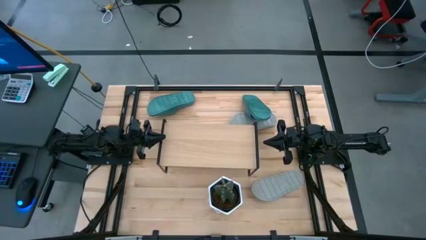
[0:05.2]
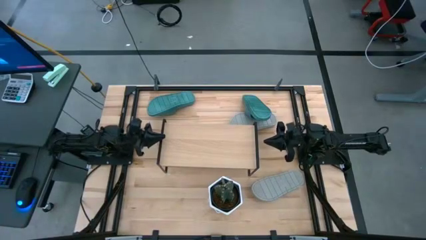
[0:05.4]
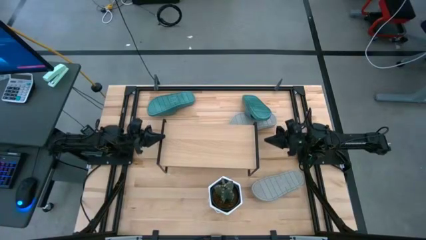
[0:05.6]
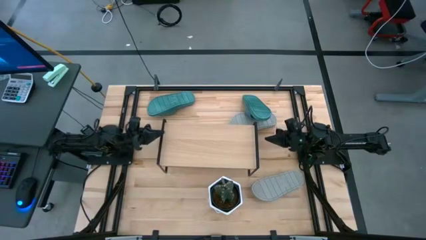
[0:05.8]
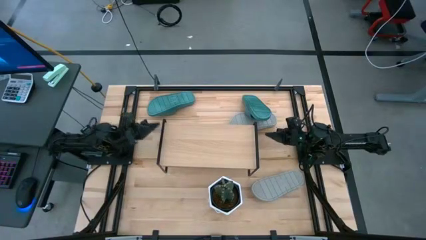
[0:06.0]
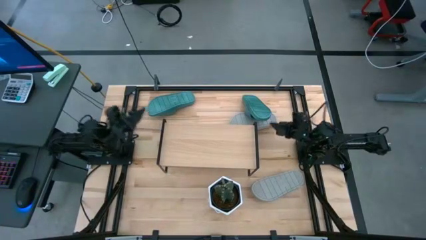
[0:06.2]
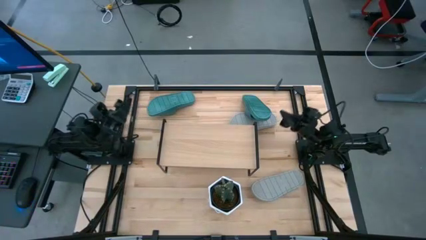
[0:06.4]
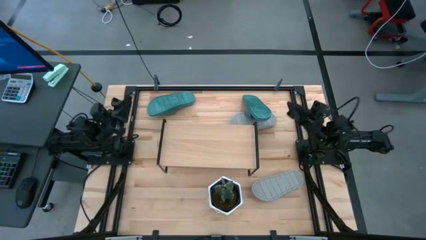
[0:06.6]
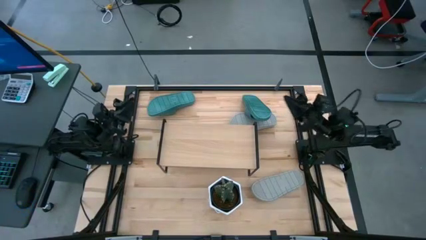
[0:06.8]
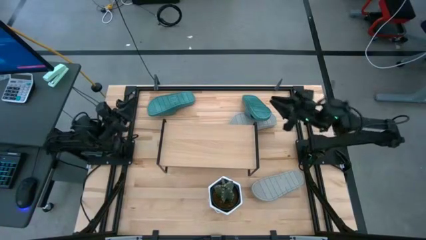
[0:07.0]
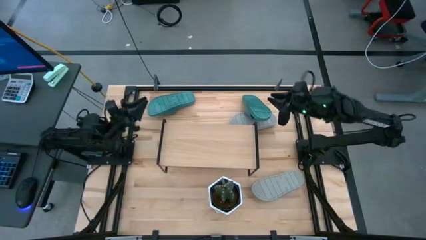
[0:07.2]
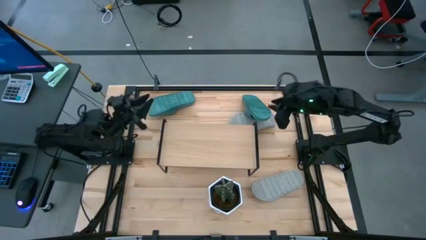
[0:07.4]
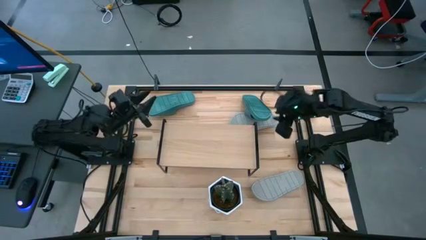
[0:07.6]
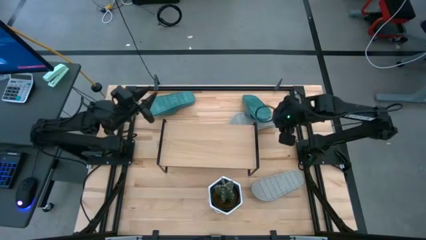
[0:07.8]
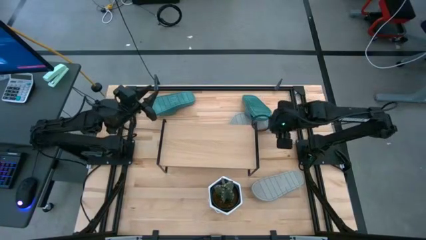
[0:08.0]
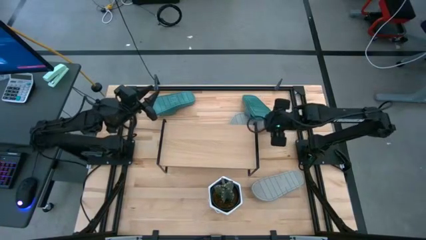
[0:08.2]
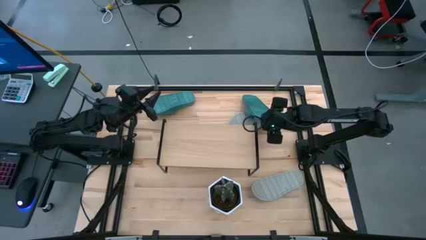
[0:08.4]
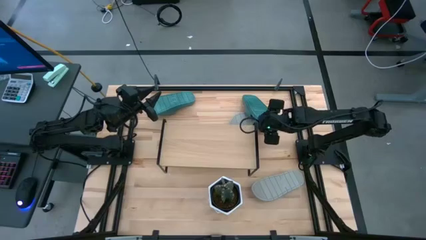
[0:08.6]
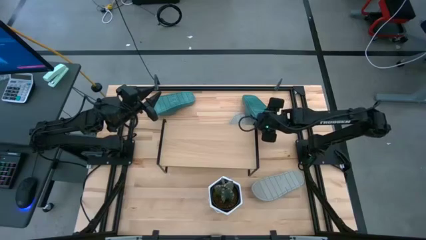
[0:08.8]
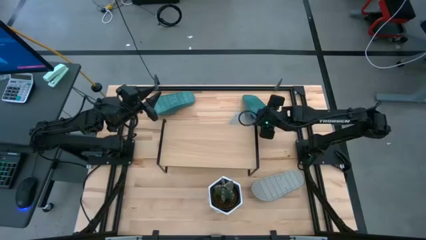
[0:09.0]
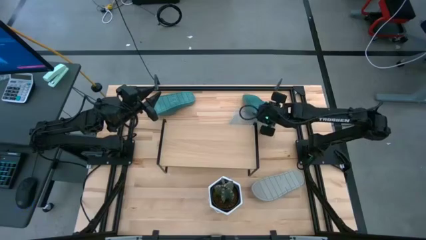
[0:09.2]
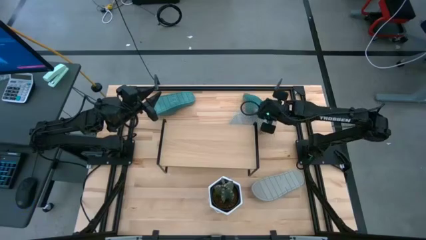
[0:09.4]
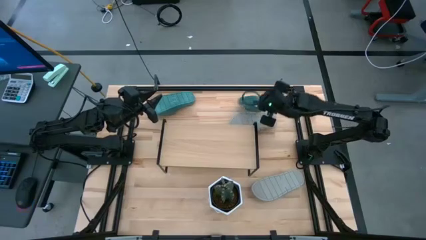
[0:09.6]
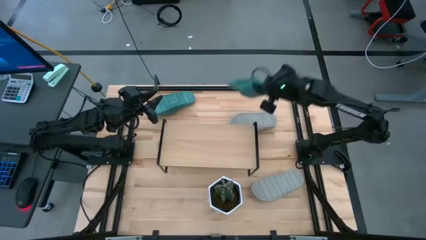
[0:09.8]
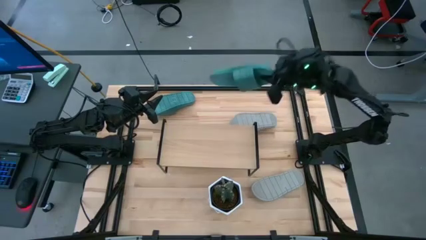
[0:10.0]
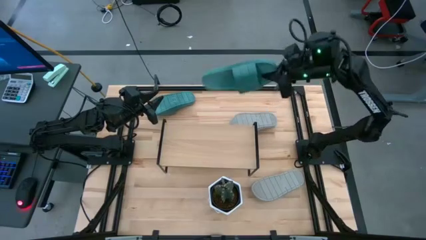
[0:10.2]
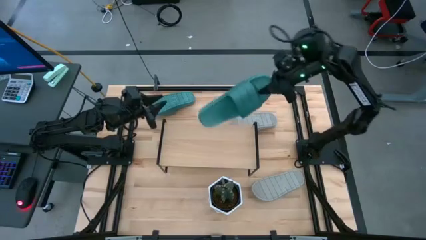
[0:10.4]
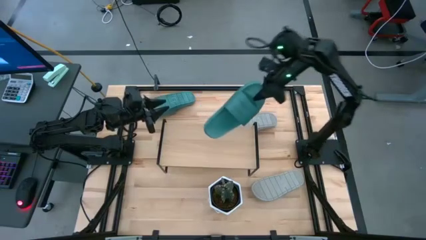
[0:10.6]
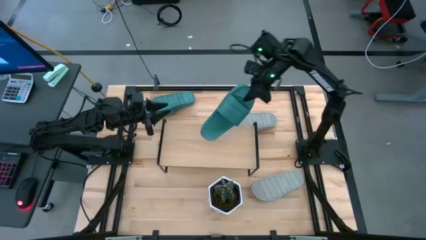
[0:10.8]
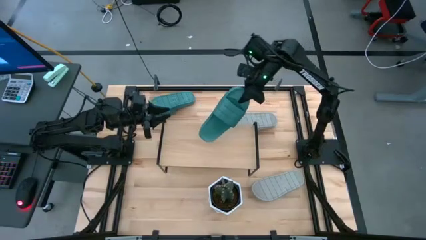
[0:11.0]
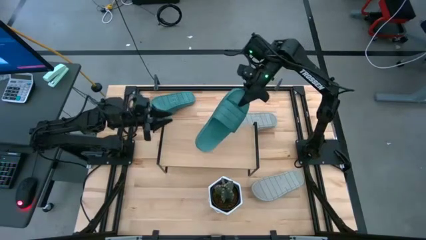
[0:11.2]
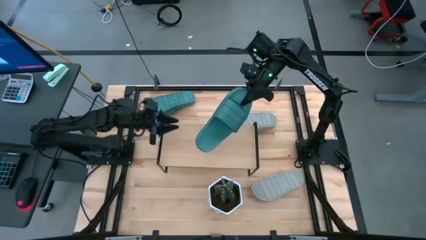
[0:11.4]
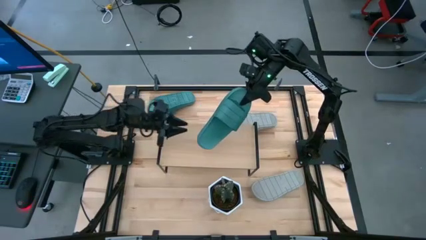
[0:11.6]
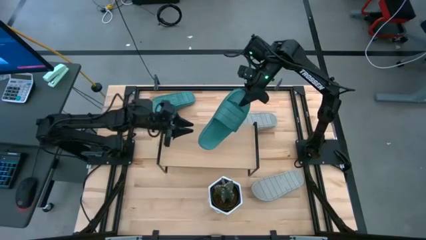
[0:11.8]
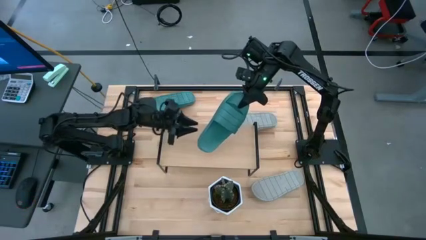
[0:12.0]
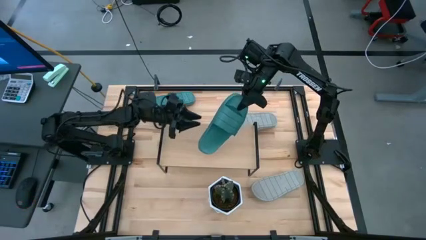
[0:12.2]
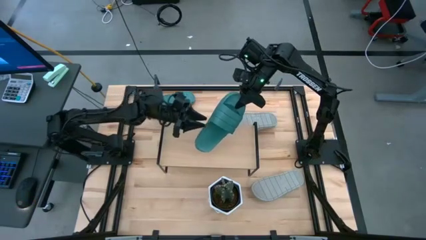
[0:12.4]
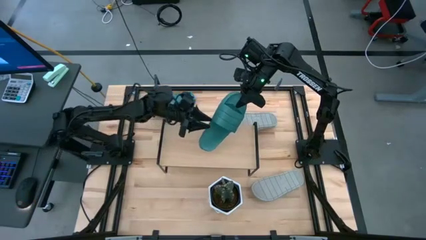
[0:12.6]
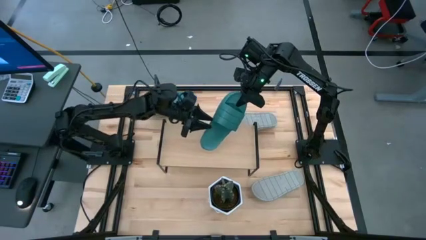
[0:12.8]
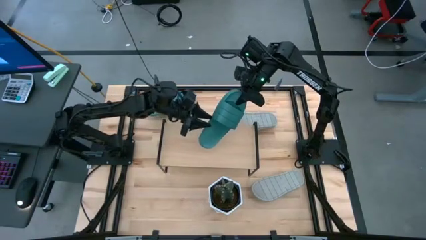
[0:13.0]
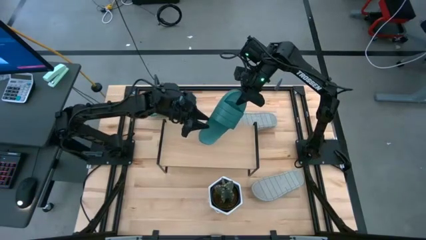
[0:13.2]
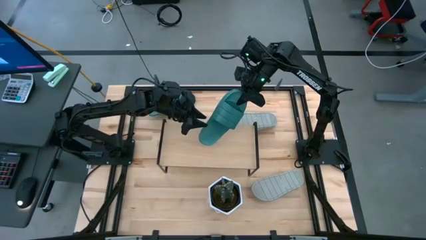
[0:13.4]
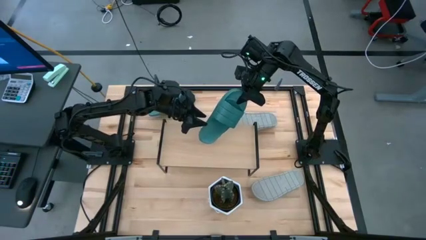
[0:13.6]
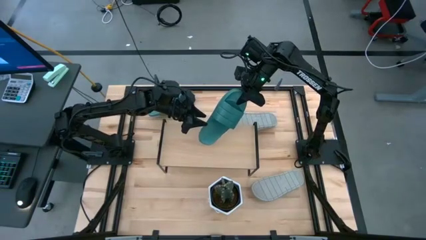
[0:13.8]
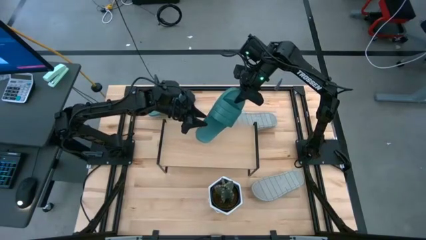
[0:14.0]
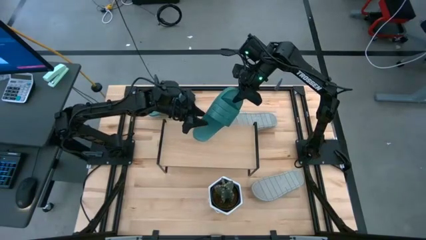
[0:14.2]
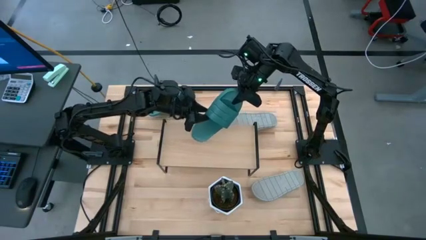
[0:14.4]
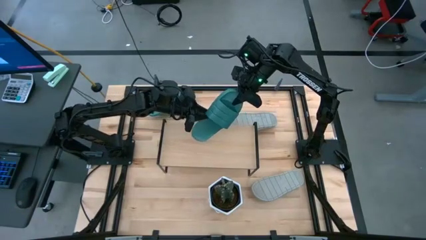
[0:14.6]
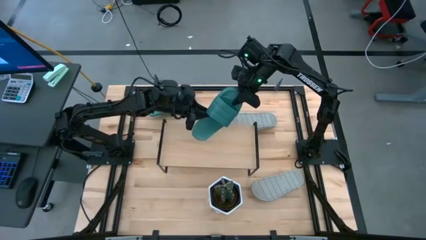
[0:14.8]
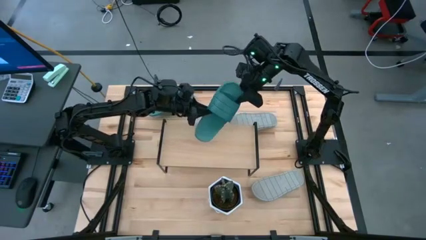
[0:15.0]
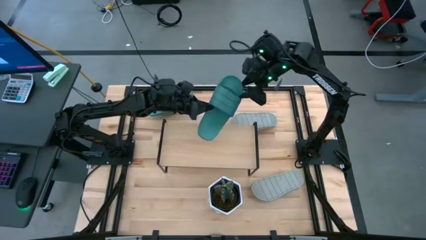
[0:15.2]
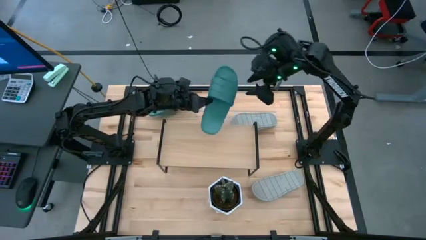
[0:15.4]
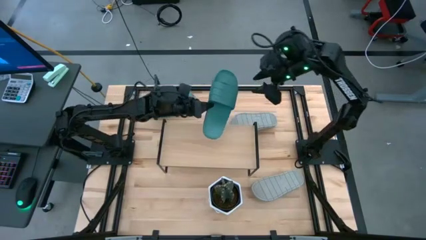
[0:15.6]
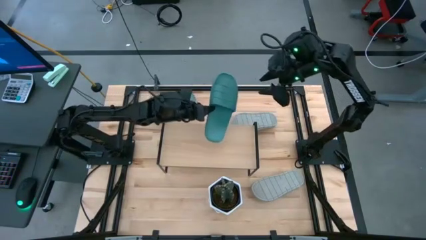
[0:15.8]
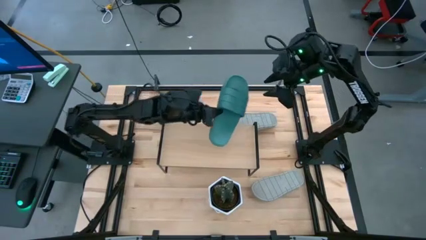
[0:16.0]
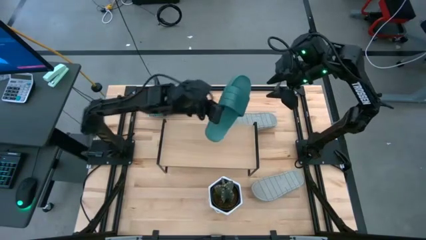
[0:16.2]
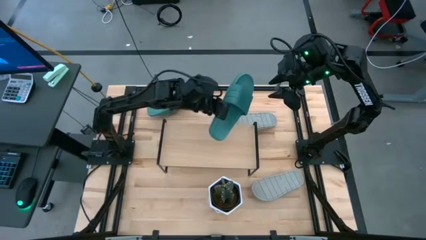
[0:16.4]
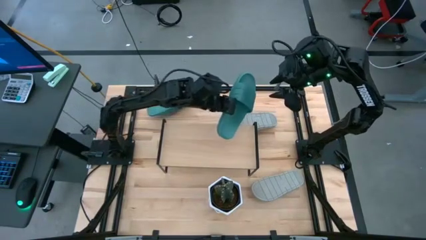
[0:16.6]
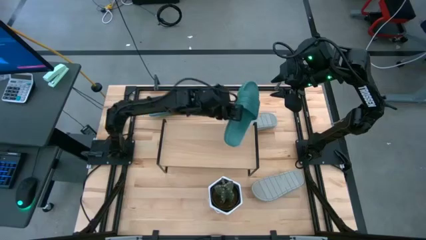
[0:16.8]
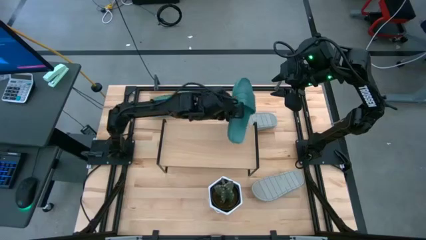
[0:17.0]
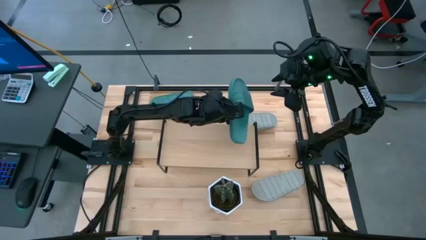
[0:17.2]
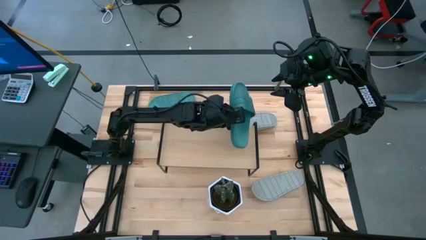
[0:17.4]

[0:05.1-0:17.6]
Task: Pick and place slides into the shelf
Put the right green slide on the shelf
